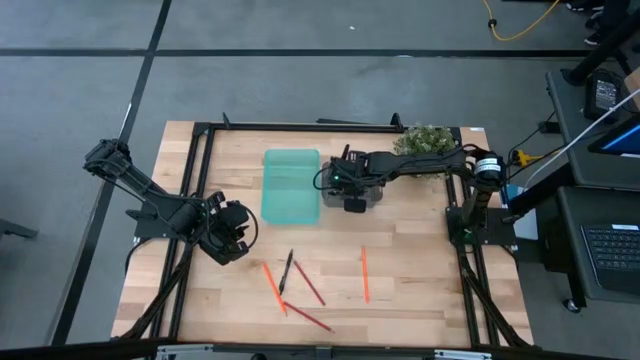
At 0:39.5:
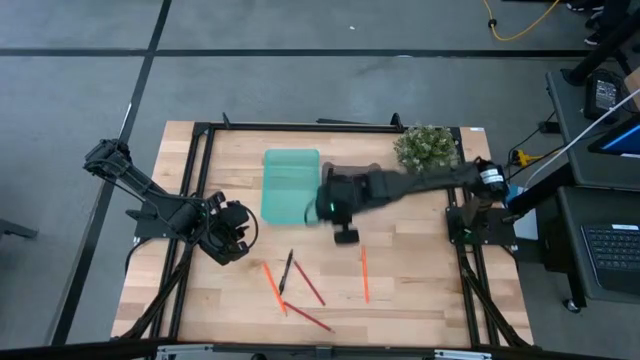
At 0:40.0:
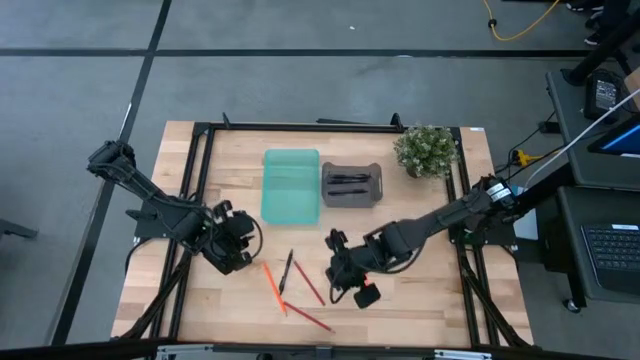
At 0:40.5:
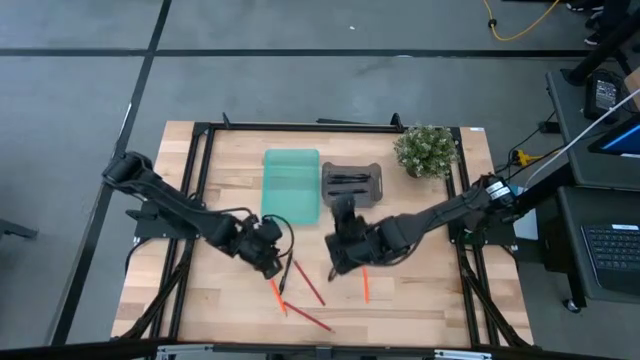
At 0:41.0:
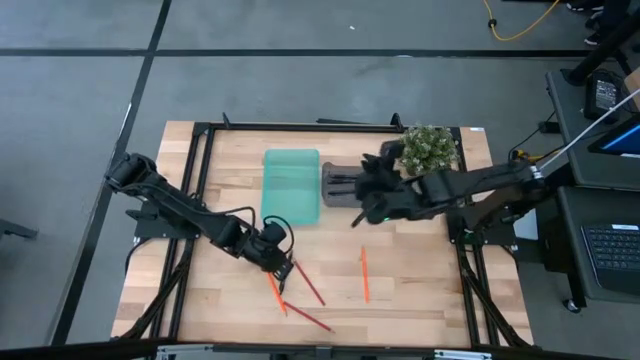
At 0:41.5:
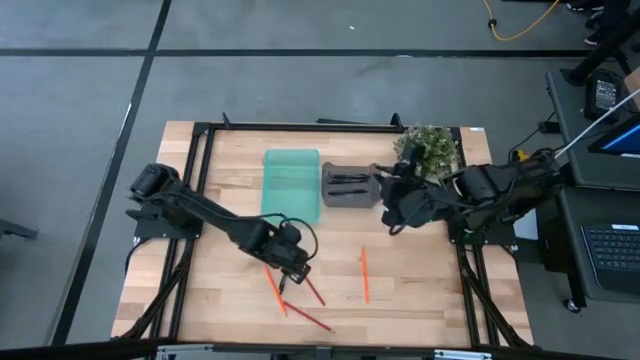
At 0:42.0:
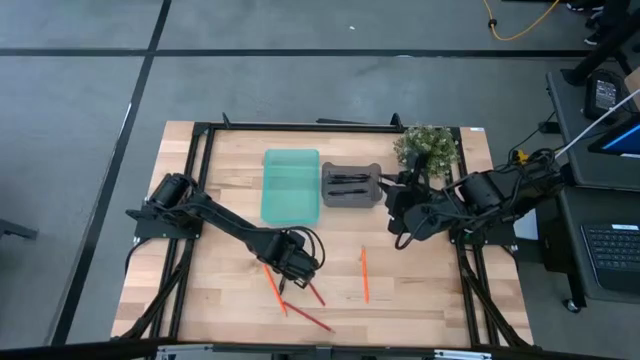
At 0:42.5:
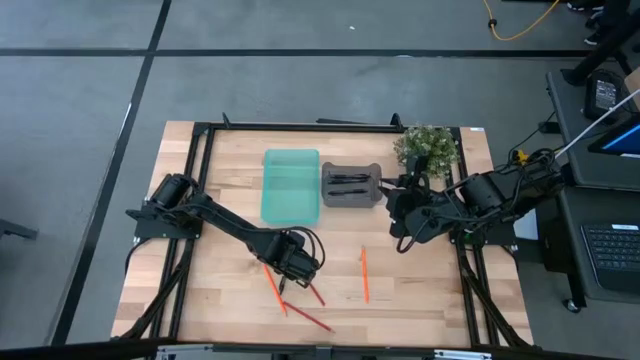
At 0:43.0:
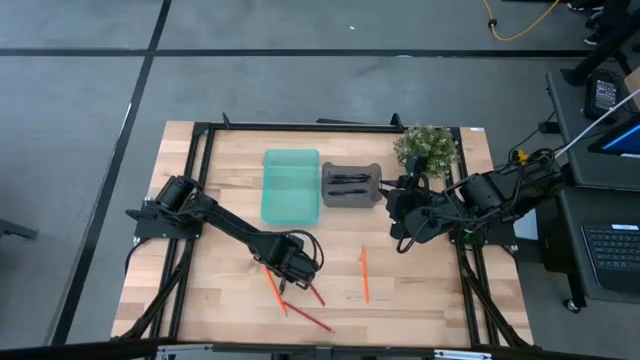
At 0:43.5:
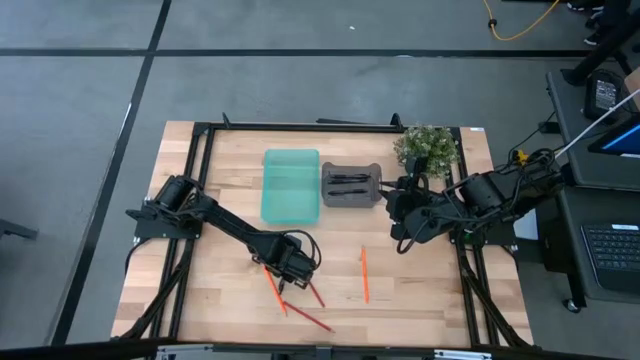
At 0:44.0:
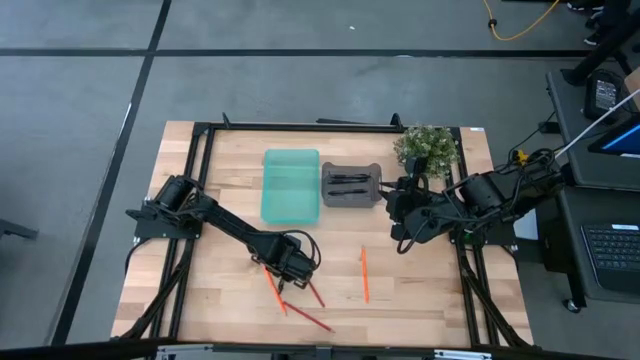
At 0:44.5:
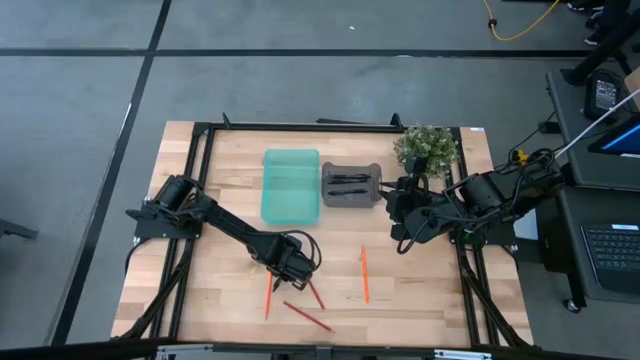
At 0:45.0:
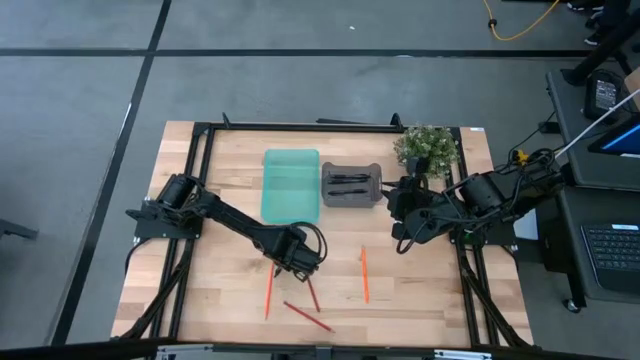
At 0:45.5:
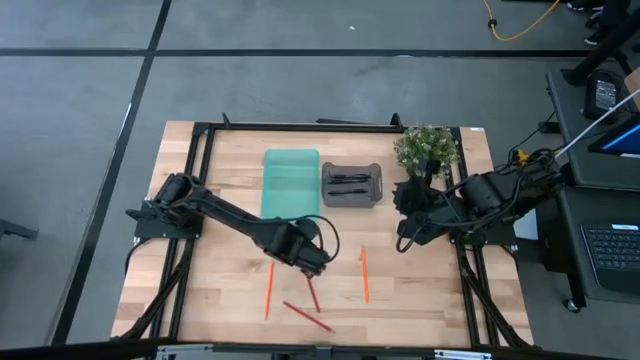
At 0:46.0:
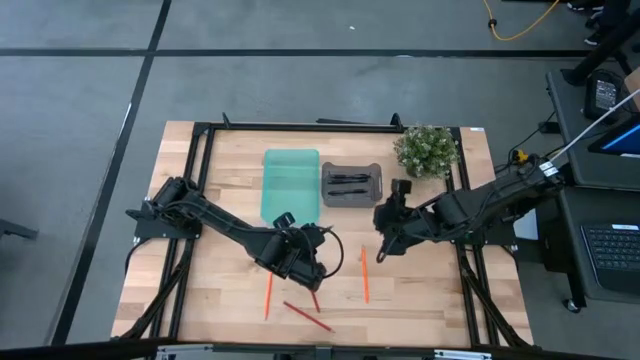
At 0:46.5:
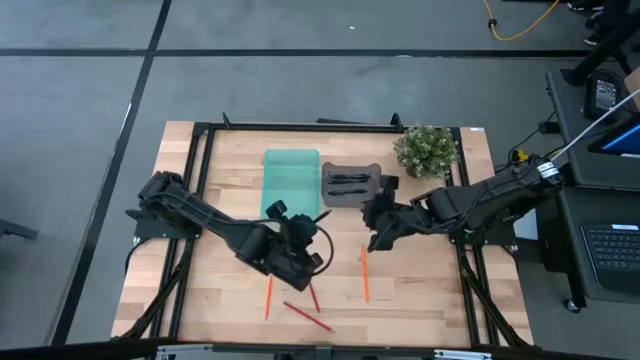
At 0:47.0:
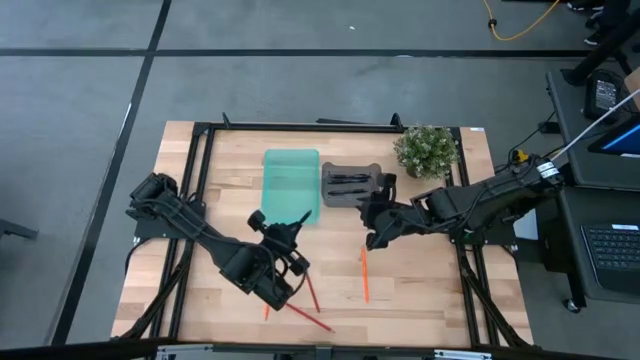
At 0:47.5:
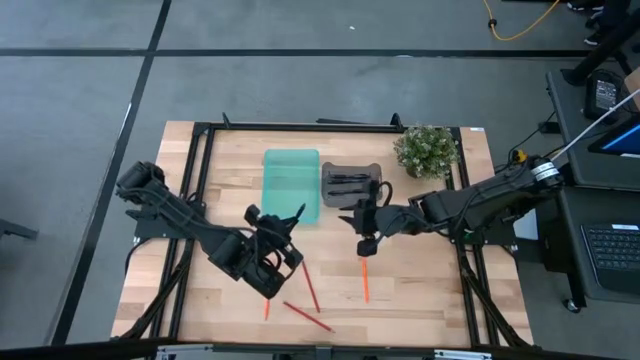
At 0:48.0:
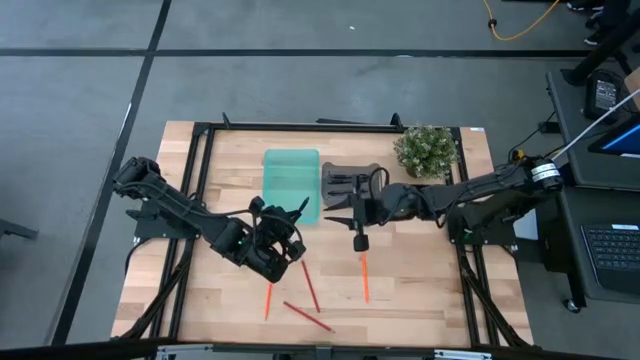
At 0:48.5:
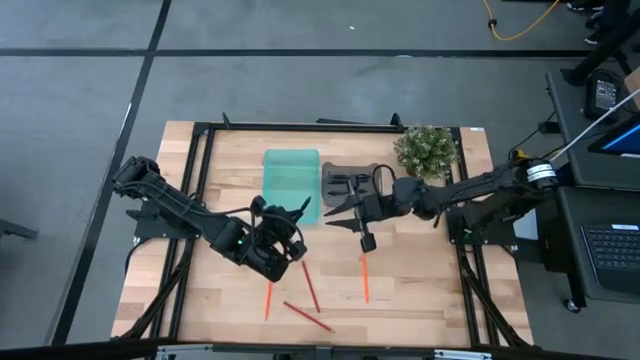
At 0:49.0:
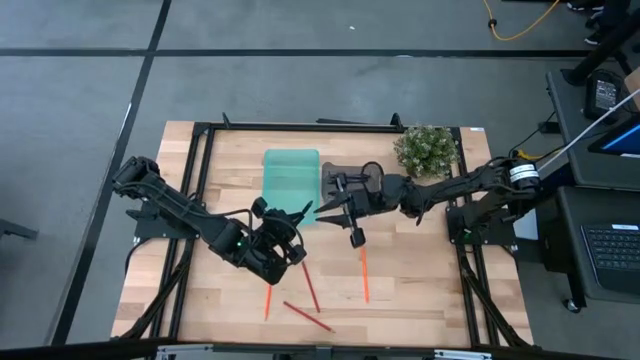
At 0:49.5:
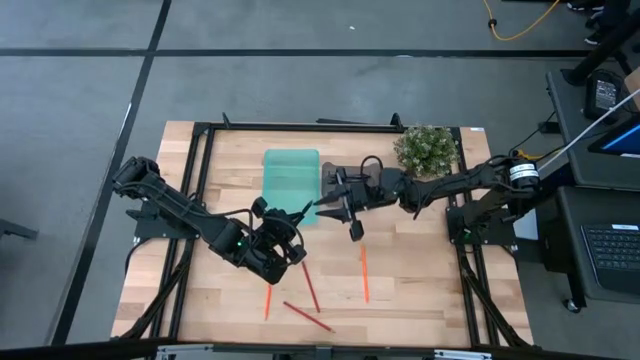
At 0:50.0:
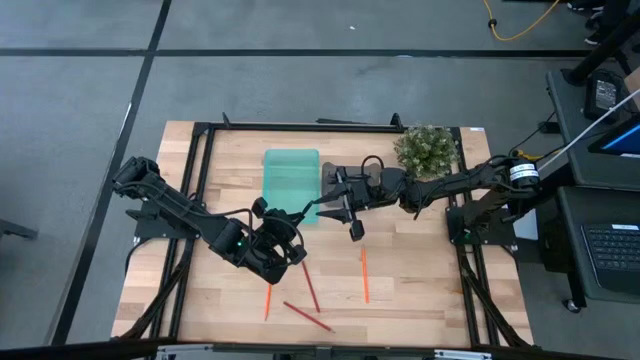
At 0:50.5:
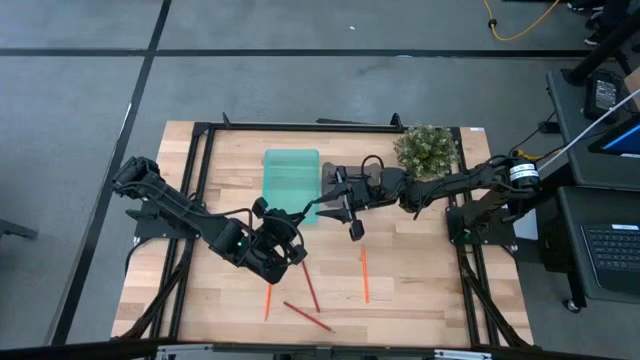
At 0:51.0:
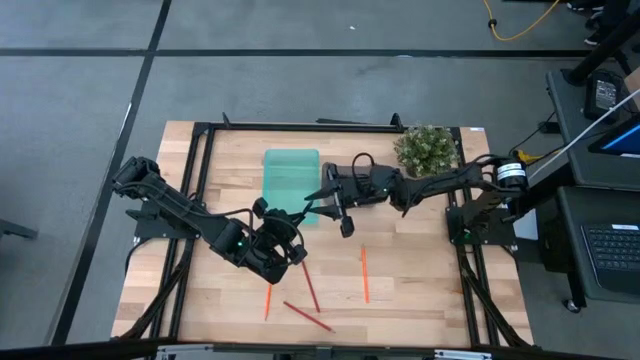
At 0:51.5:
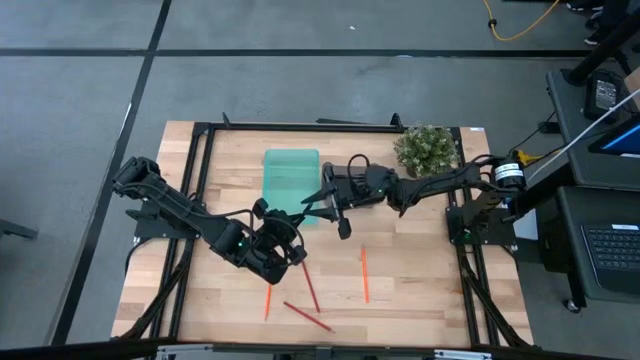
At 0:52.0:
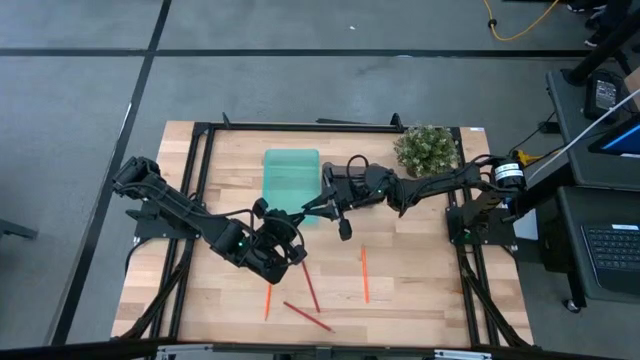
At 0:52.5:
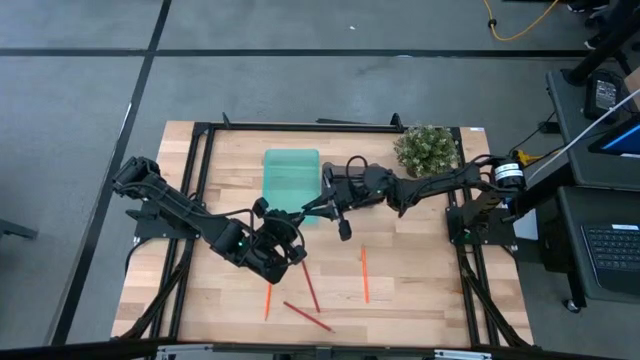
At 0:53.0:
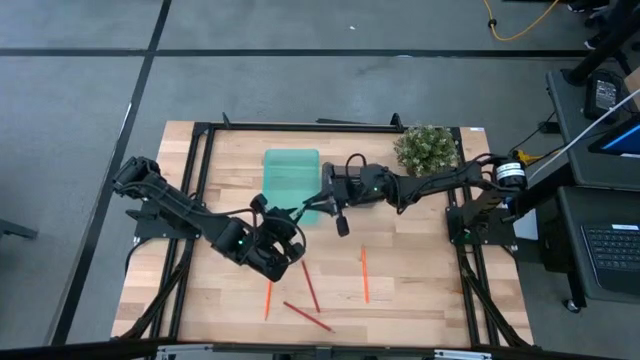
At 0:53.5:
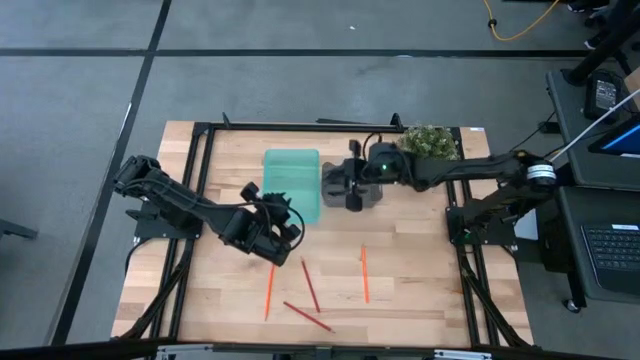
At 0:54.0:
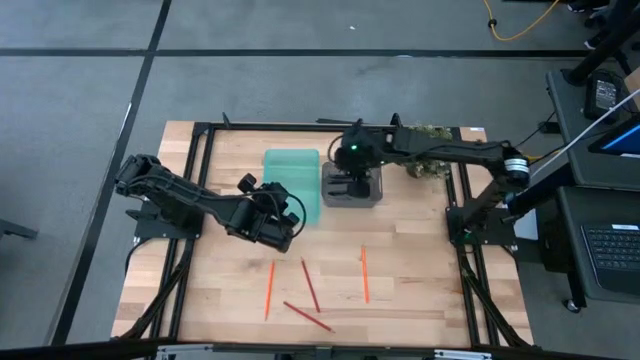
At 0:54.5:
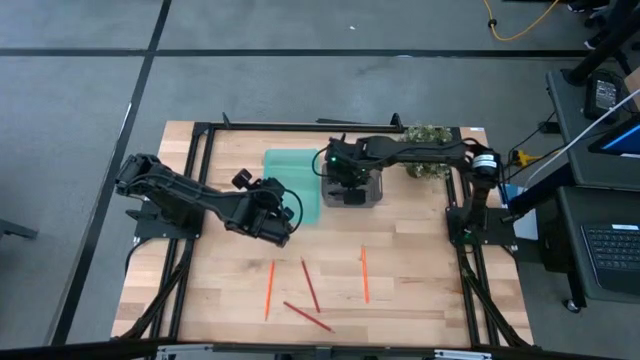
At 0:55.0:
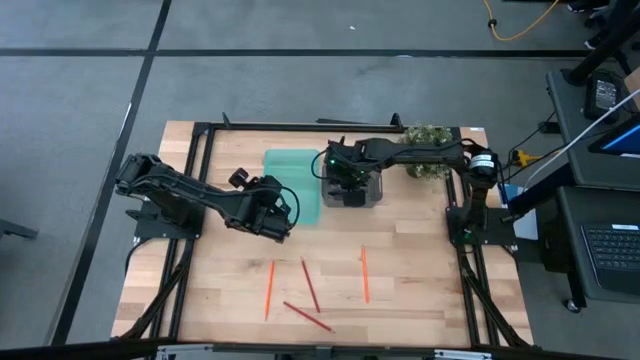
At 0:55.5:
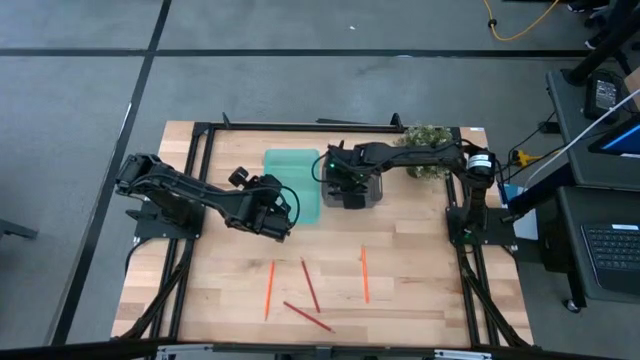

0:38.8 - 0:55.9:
Task: Sort pens & pencils
Put the black pen into the black bin

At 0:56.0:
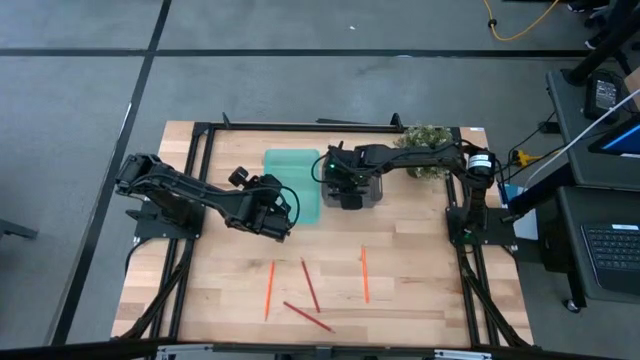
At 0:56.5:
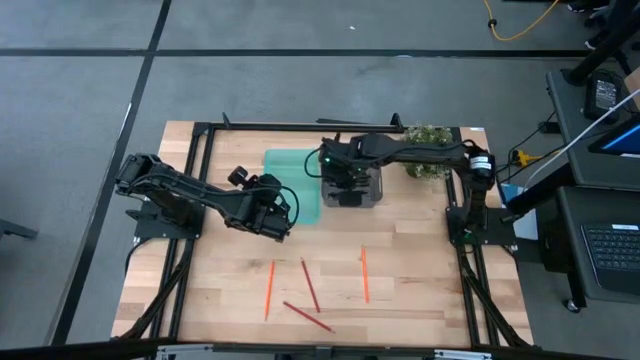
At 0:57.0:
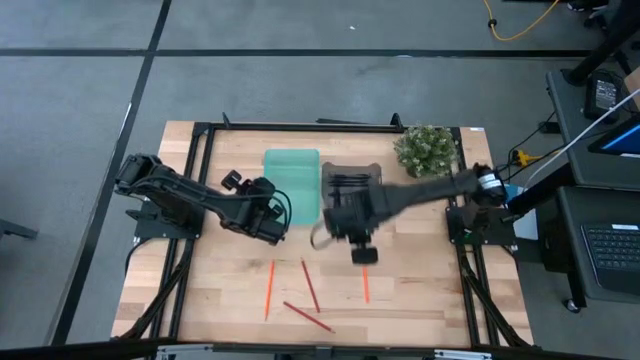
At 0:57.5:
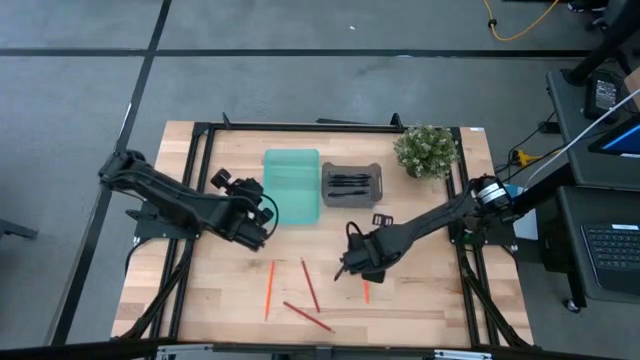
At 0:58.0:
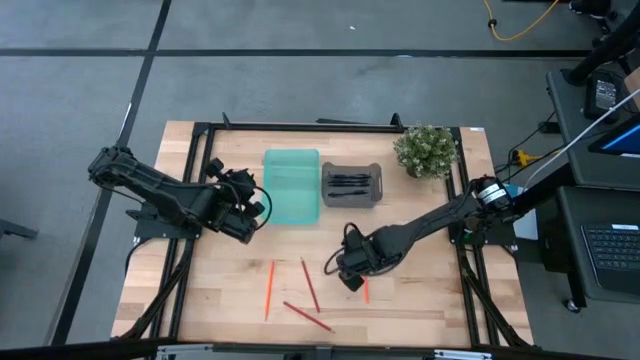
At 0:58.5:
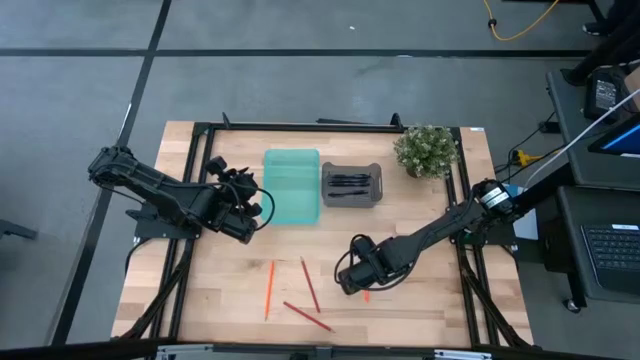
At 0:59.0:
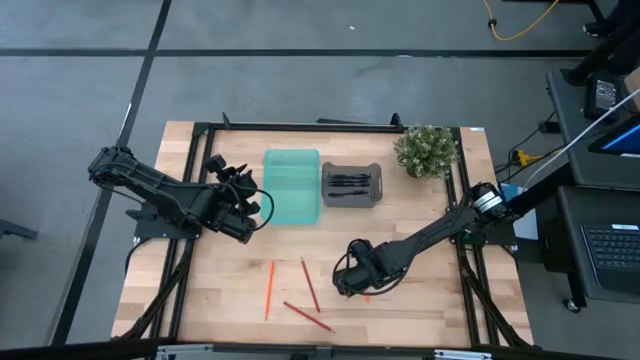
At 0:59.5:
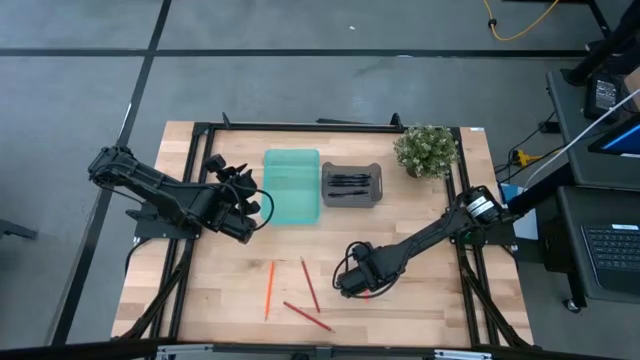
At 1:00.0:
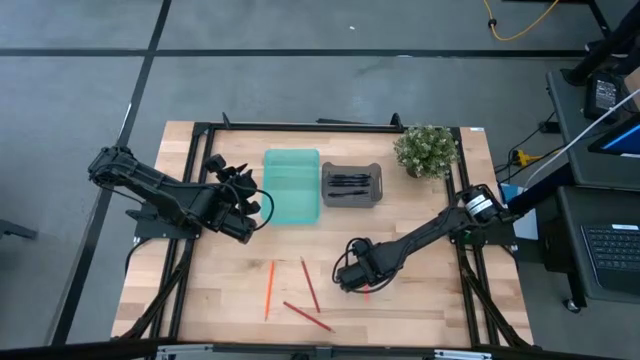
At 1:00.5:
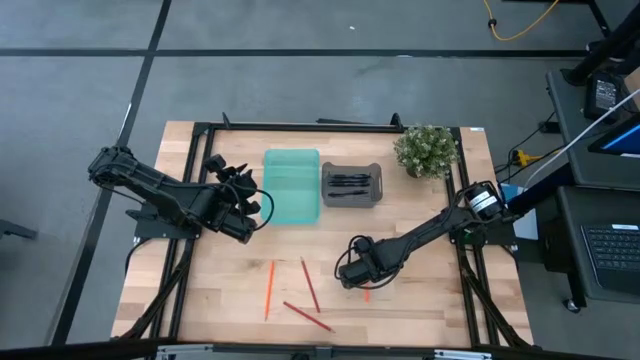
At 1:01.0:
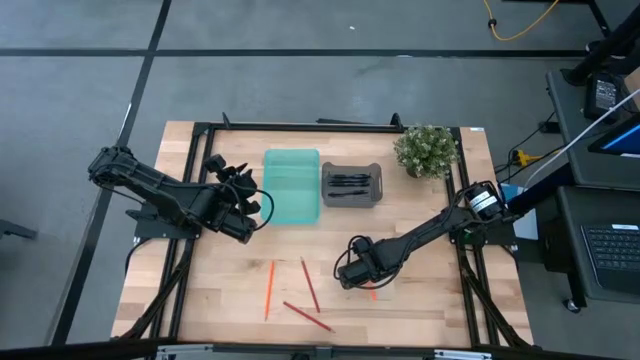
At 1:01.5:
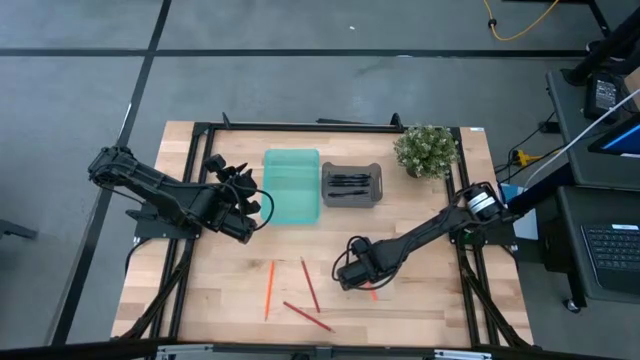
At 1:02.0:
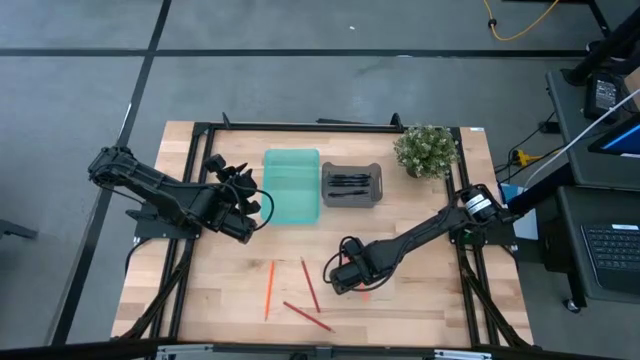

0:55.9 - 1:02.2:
Put the orange pencil into the green bin
